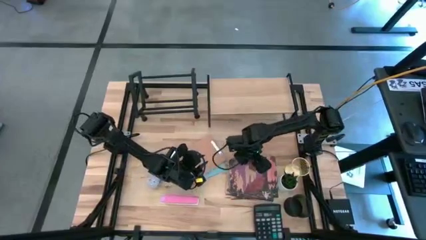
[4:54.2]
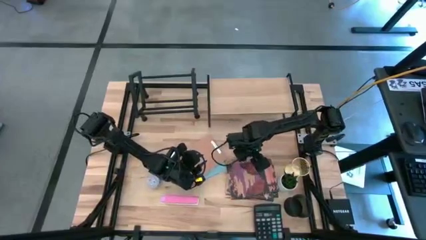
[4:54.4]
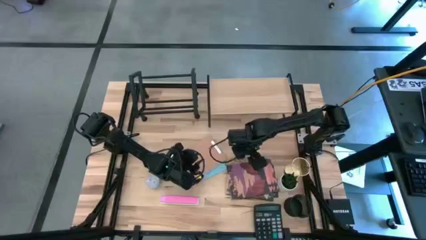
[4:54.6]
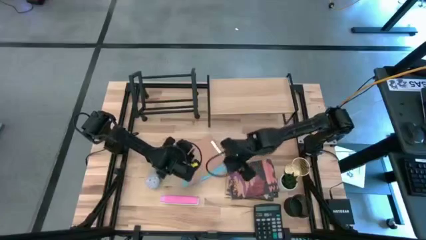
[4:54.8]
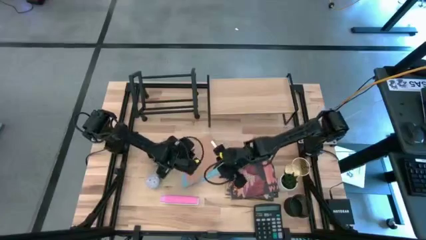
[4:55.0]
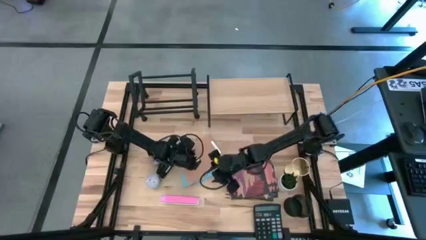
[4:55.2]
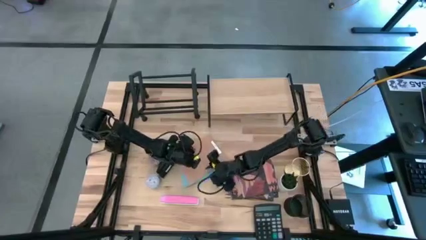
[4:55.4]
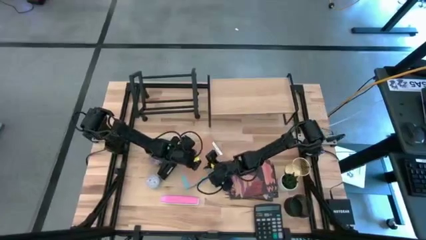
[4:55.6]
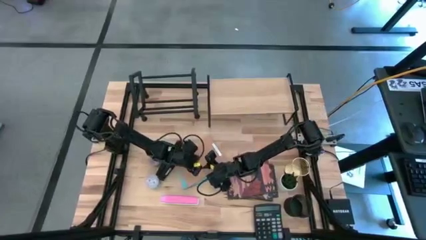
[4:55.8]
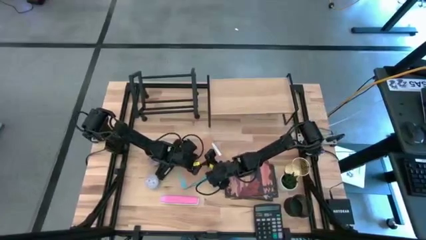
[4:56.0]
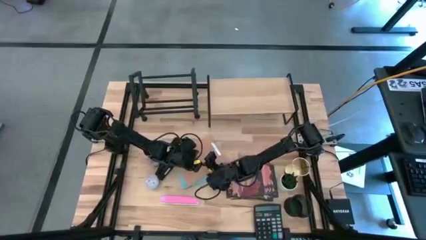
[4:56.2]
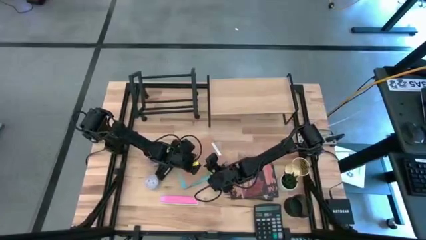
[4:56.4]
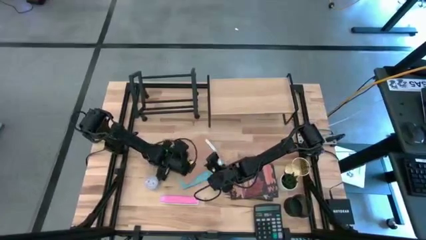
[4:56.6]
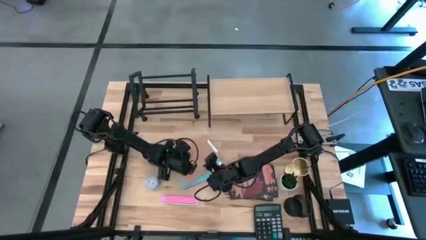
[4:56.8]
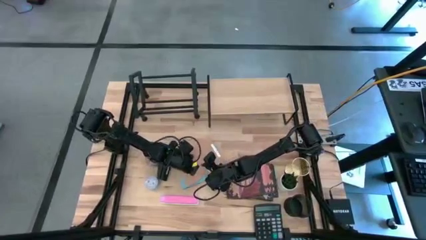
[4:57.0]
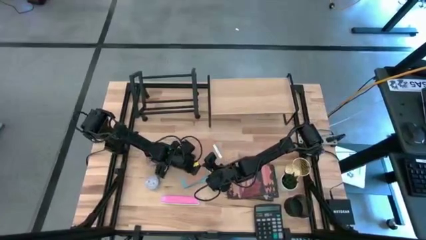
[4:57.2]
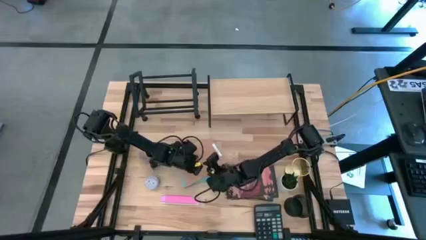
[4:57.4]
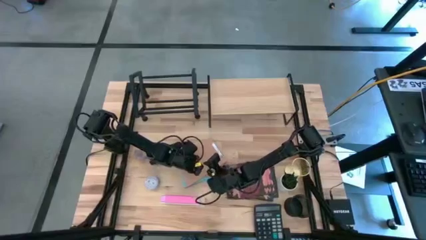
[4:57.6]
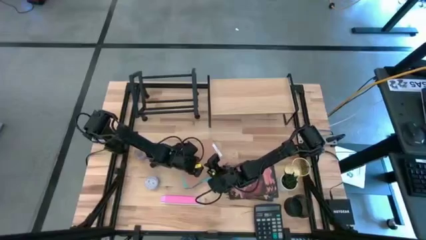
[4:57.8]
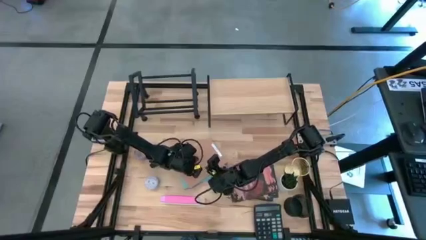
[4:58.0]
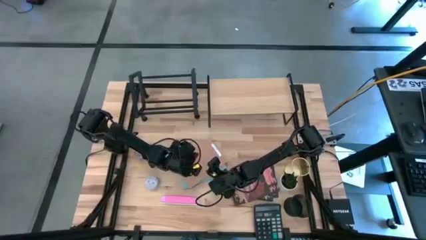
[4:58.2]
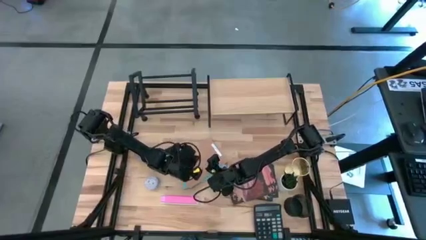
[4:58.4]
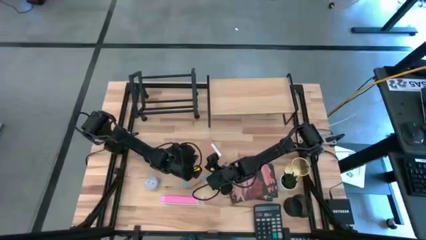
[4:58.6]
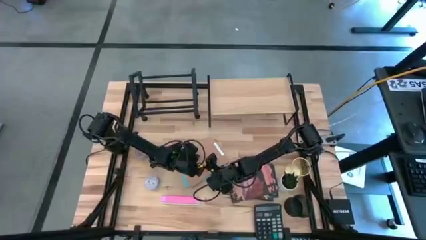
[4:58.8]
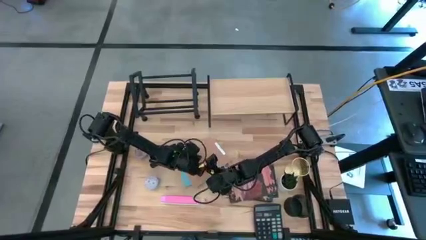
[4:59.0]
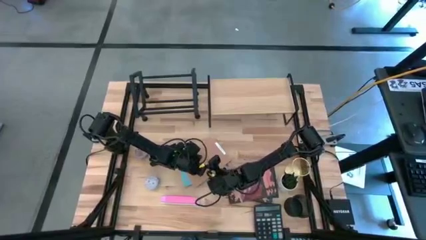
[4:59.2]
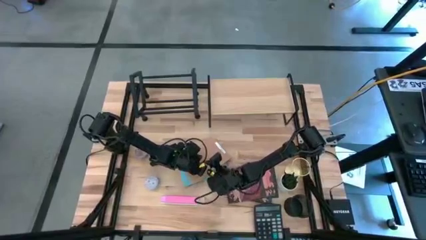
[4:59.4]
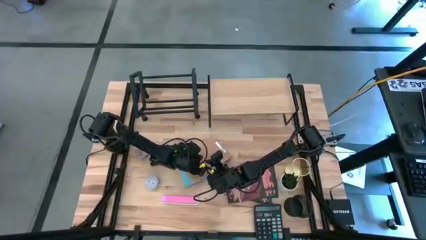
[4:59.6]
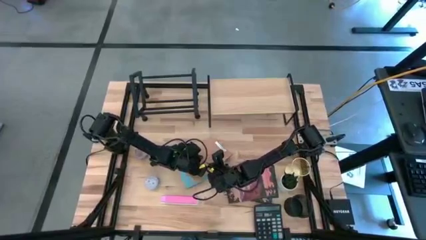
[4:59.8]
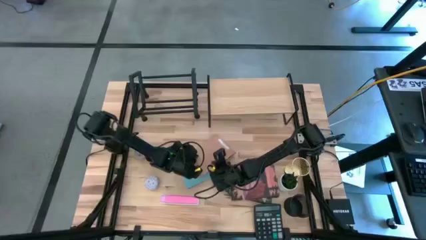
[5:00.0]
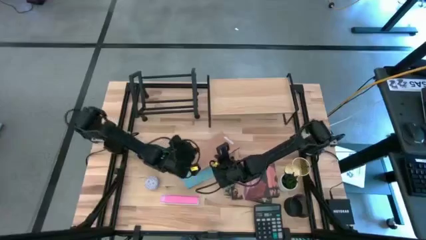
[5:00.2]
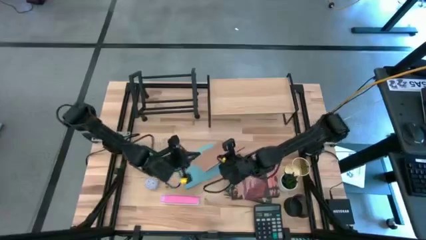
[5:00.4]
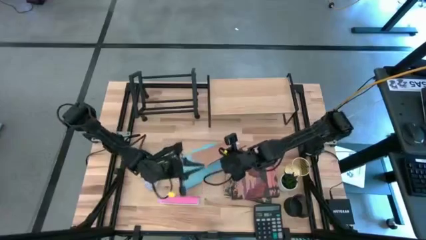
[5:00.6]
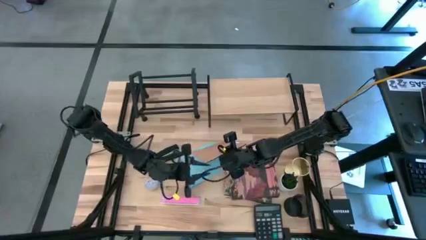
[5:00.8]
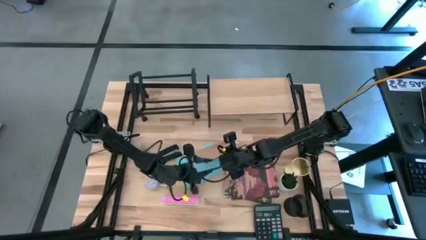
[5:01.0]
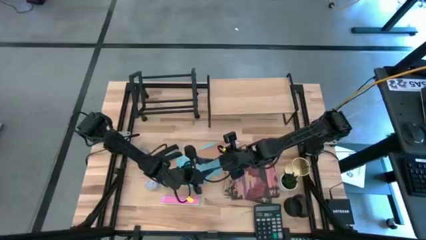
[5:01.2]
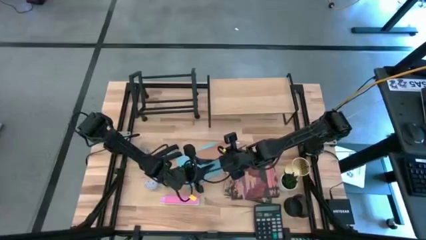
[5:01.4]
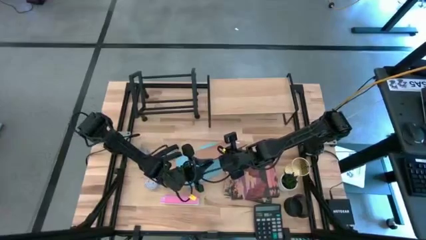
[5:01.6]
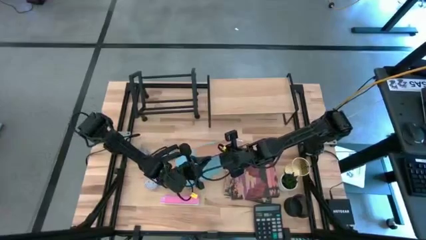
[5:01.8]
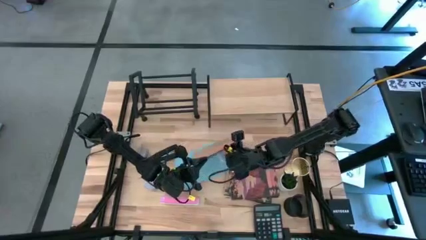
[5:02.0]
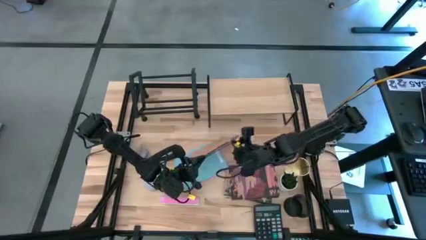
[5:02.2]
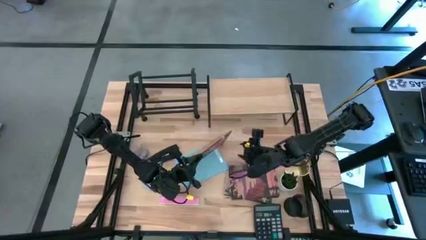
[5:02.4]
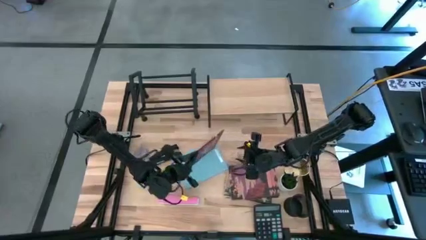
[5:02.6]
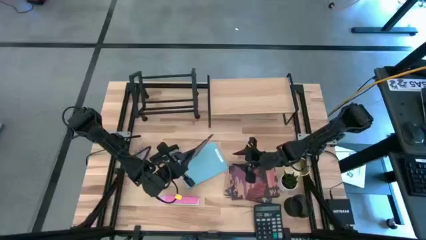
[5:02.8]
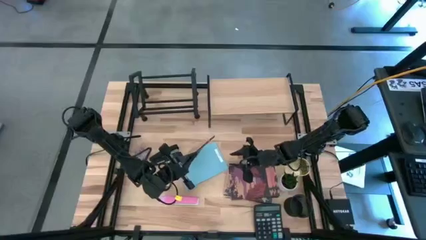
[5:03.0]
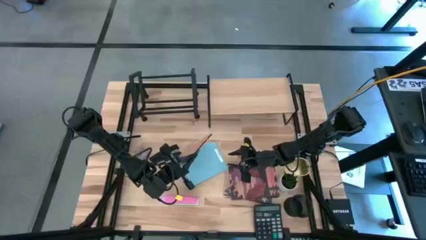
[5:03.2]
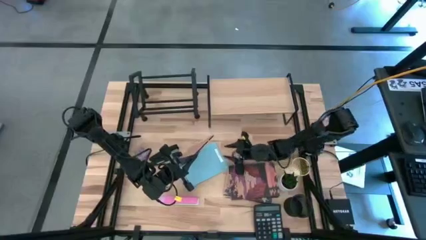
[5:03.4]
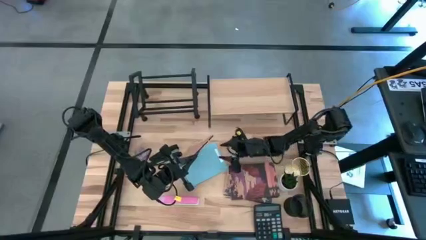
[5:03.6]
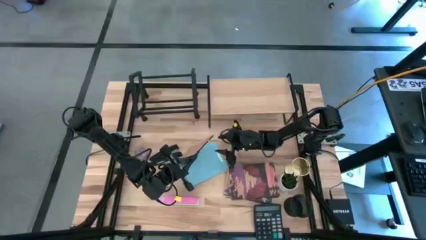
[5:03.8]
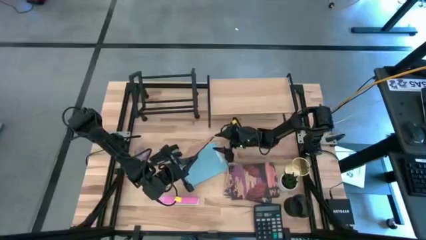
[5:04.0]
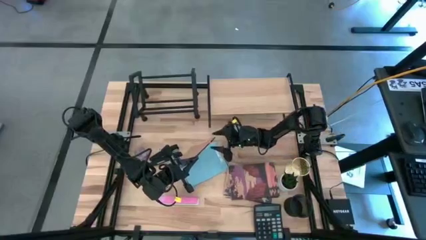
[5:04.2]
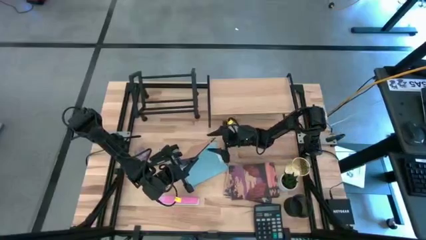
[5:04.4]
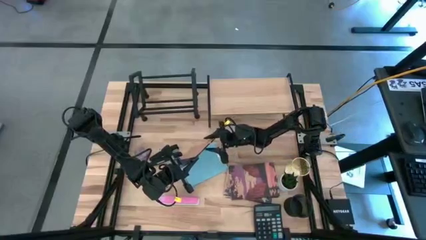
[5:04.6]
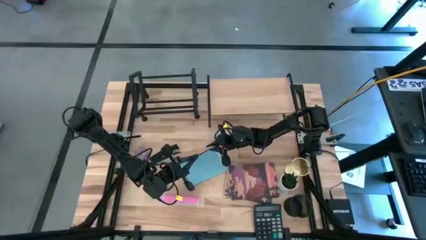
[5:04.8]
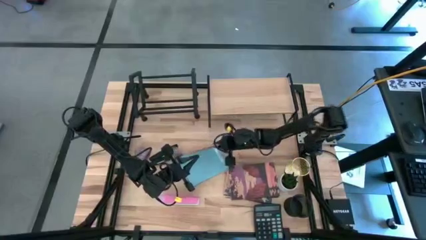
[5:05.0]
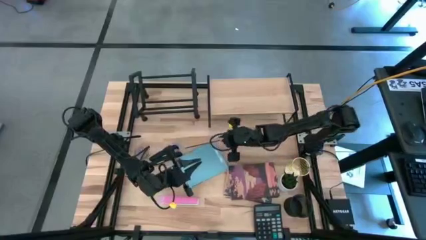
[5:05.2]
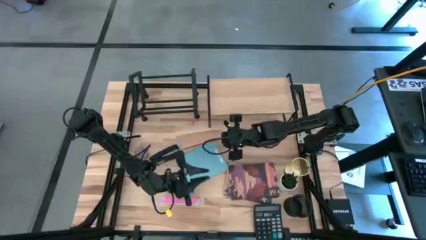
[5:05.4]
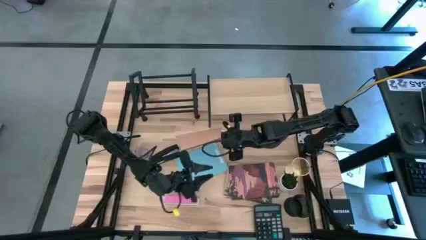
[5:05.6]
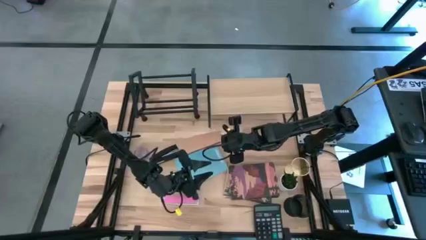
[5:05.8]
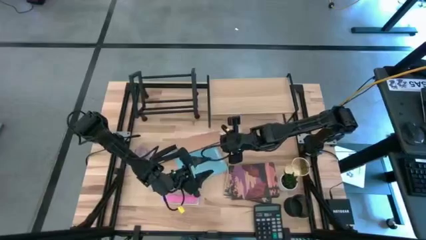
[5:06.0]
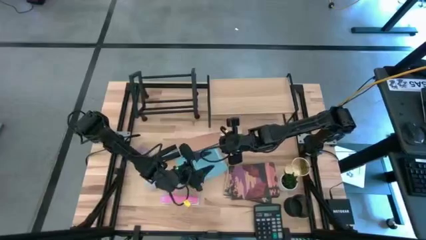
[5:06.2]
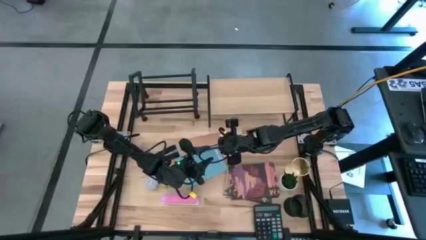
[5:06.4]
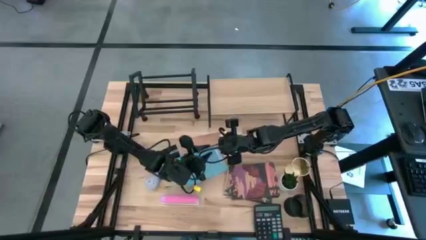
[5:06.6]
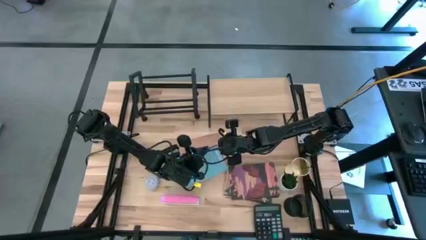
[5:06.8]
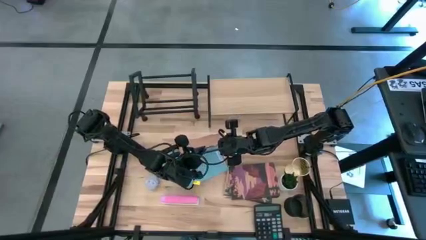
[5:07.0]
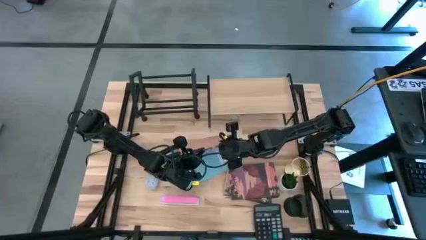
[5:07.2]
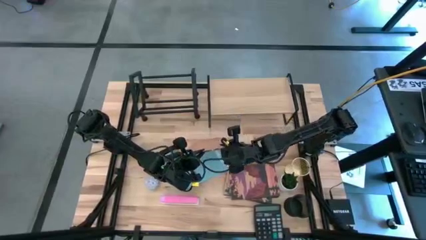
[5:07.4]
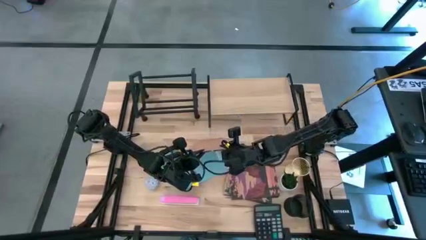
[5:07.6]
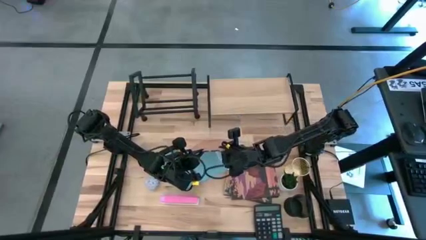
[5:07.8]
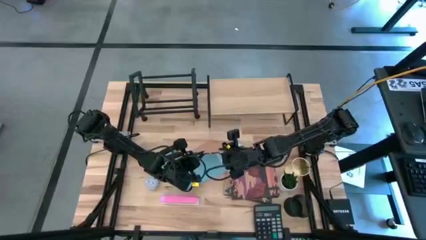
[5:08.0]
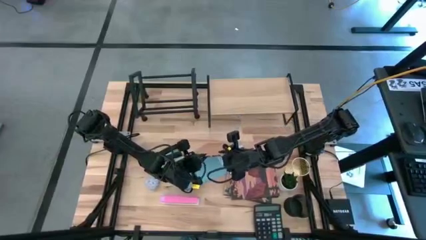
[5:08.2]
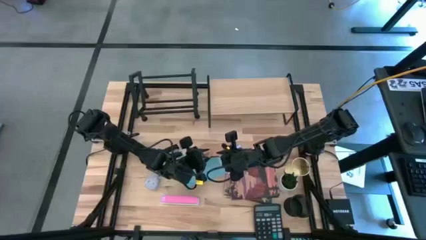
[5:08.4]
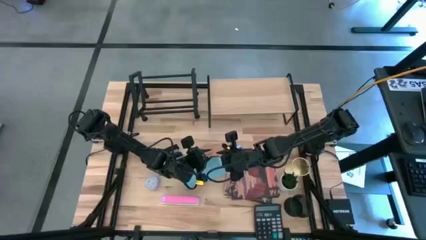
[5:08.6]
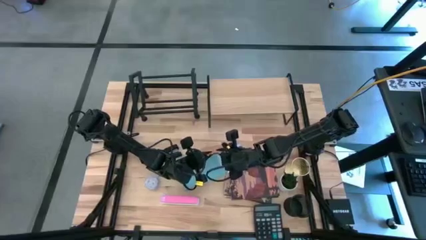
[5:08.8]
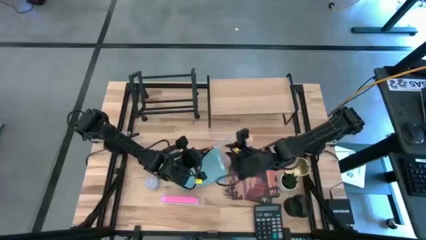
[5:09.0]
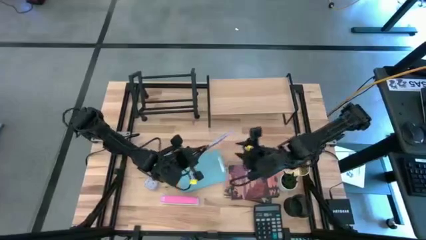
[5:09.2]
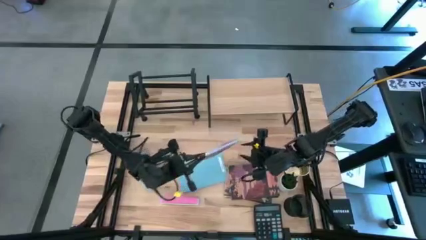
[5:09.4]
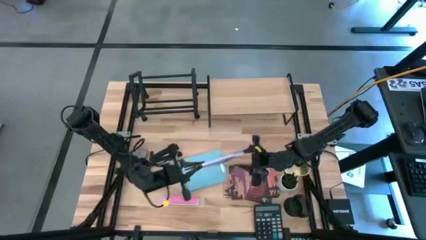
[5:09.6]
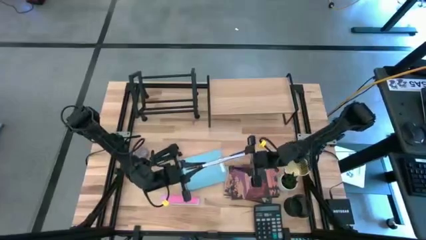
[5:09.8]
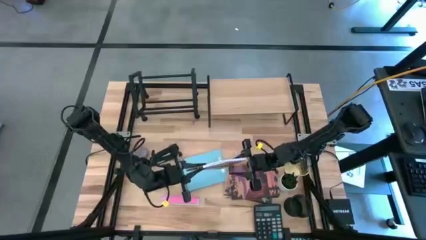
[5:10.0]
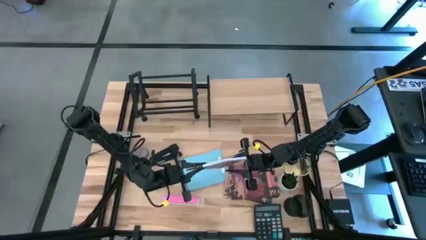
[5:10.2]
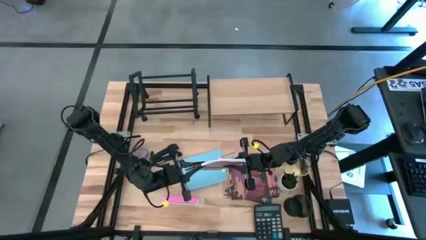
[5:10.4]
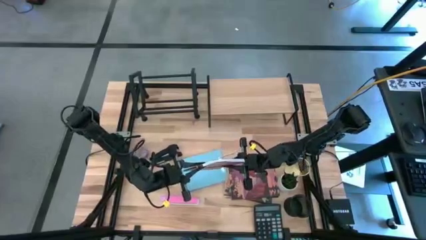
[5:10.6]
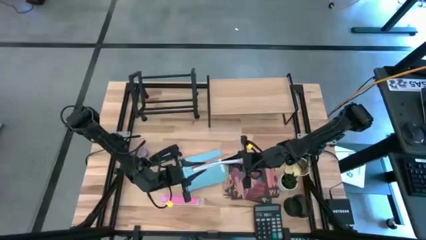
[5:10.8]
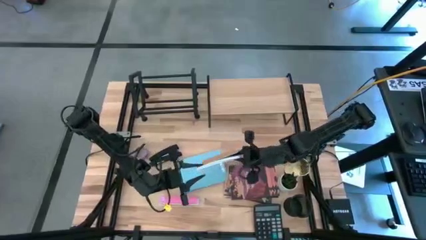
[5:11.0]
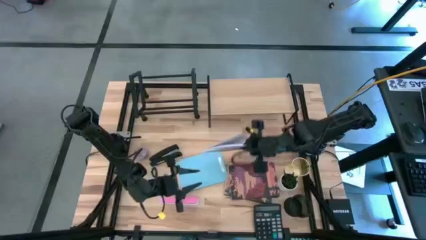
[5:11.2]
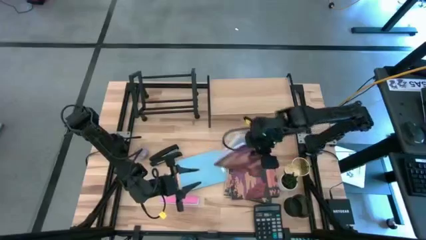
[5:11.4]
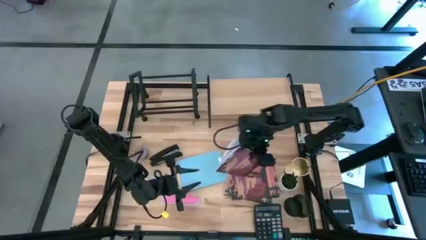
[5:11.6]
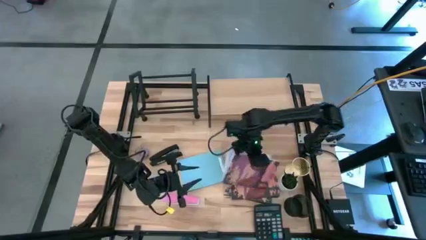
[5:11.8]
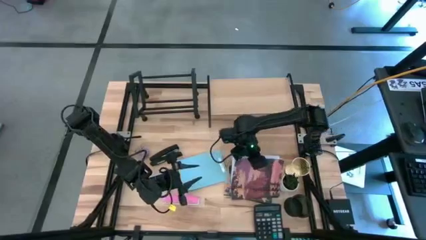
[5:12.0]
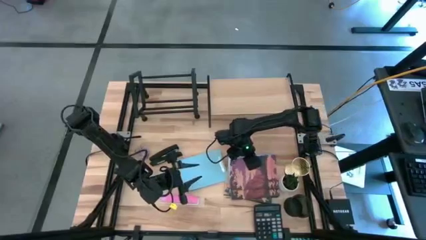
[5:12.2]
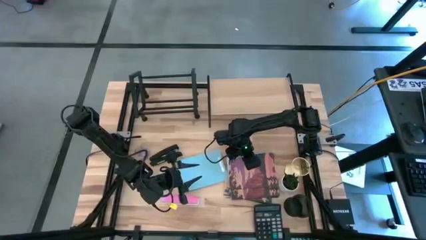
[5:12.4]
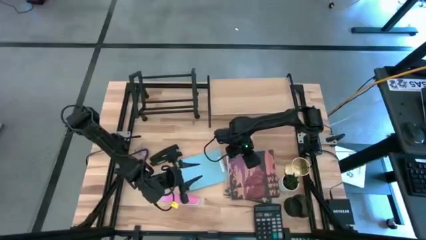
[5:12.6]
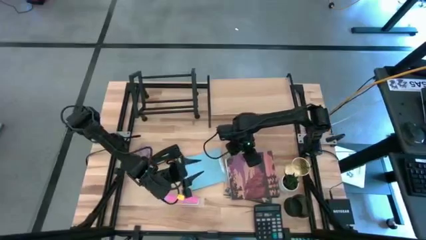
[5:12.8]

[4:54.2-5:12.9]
Task: Stock shelves
Stack the brown book on top of the brown book
